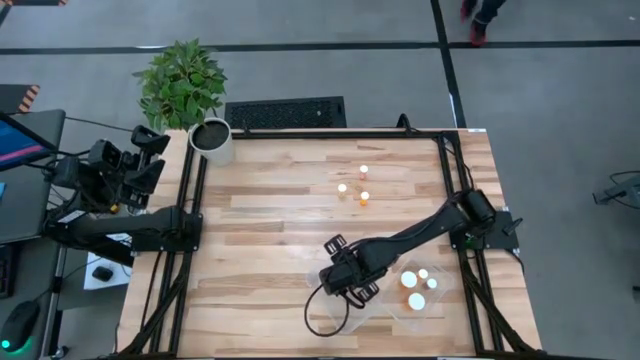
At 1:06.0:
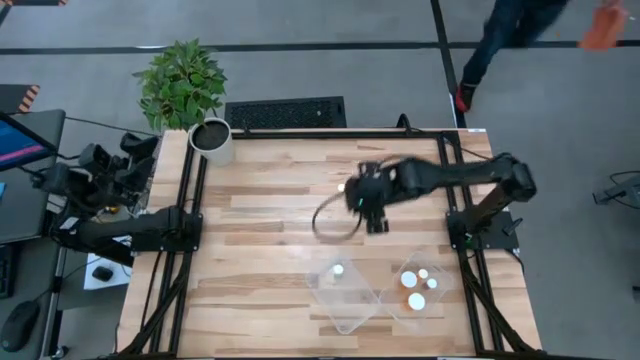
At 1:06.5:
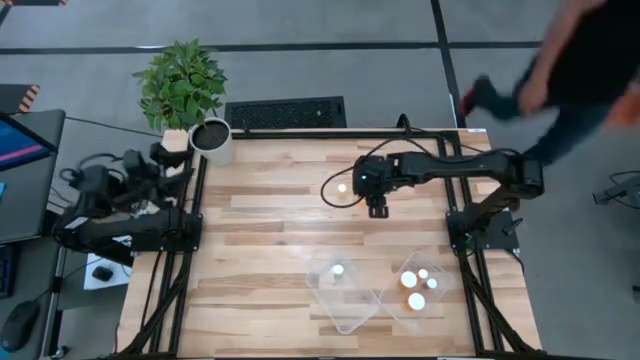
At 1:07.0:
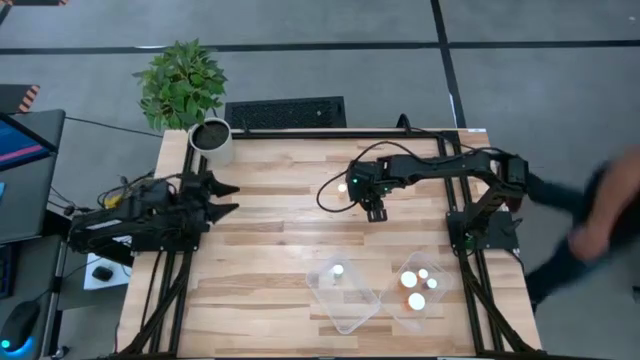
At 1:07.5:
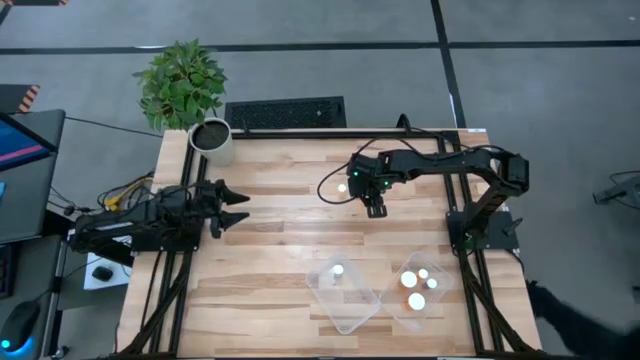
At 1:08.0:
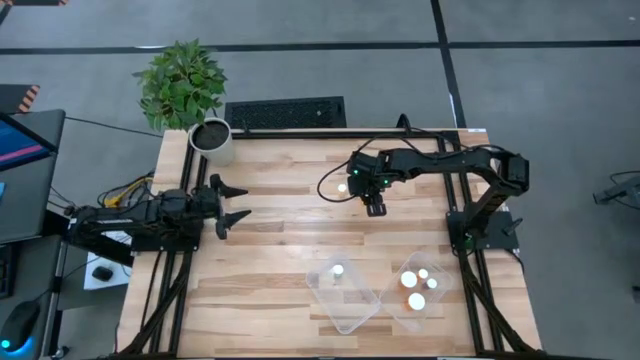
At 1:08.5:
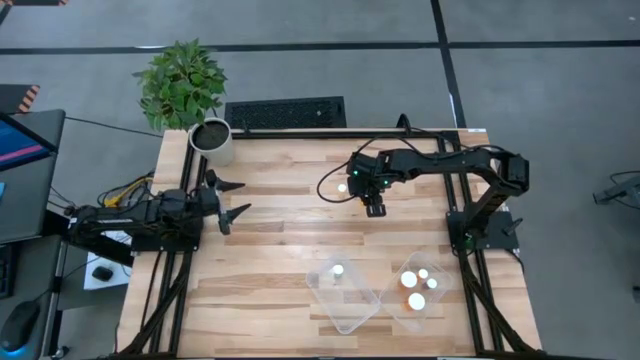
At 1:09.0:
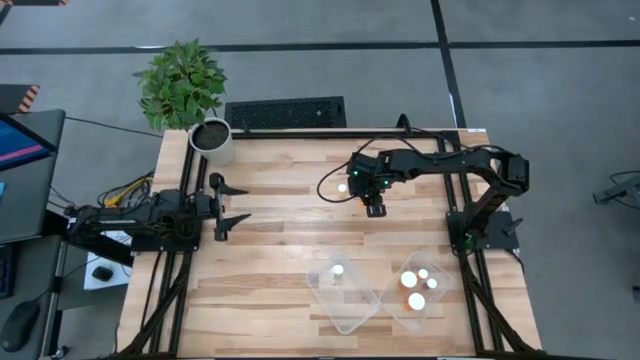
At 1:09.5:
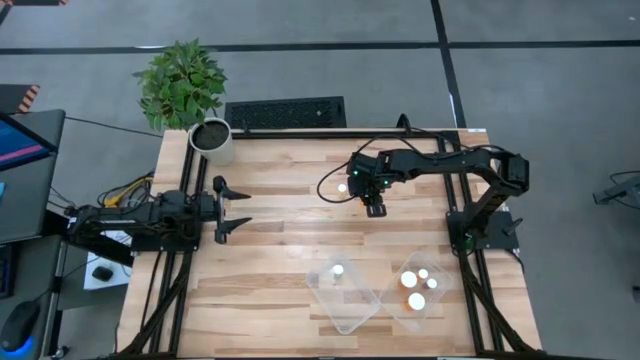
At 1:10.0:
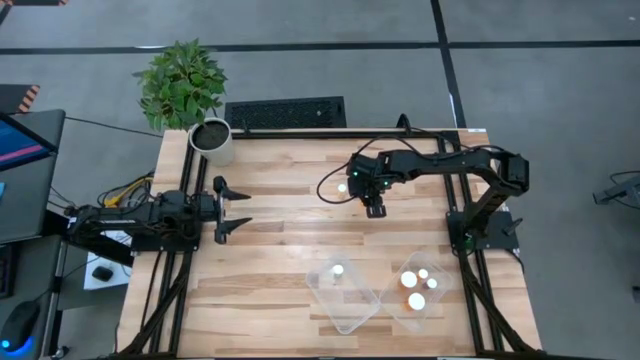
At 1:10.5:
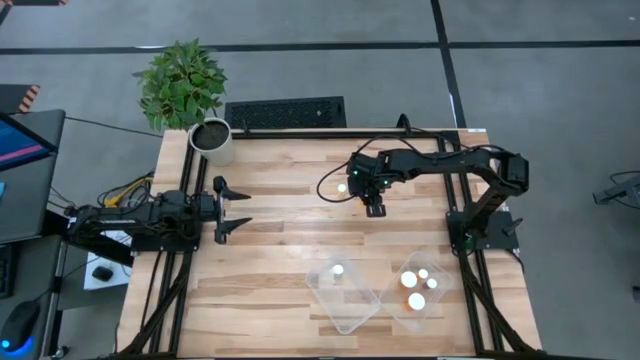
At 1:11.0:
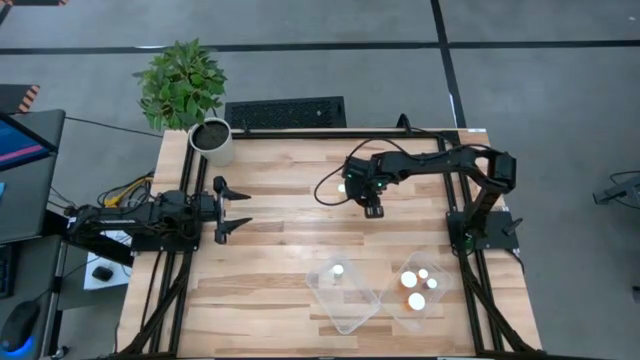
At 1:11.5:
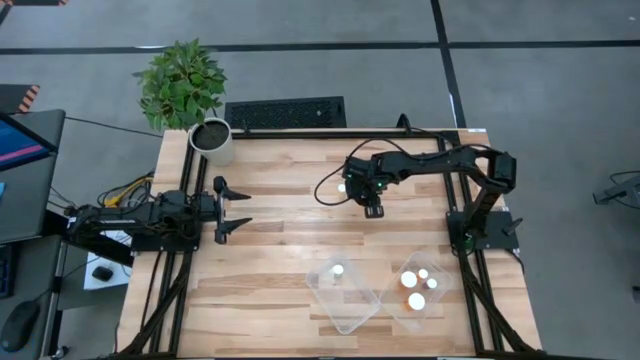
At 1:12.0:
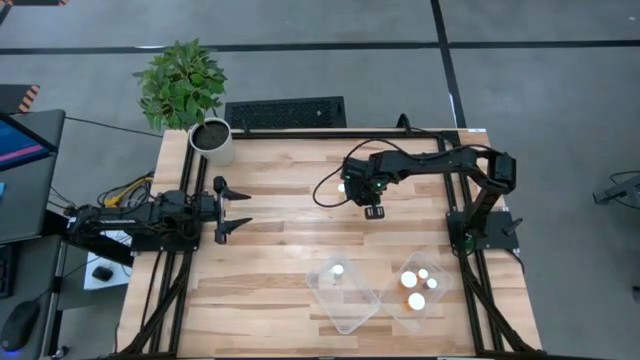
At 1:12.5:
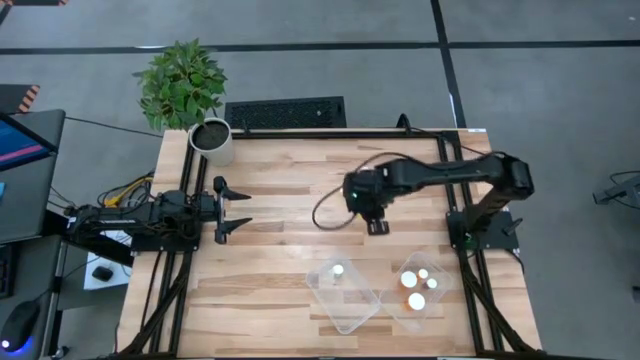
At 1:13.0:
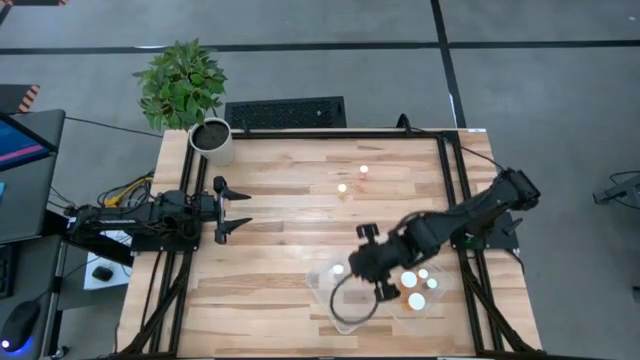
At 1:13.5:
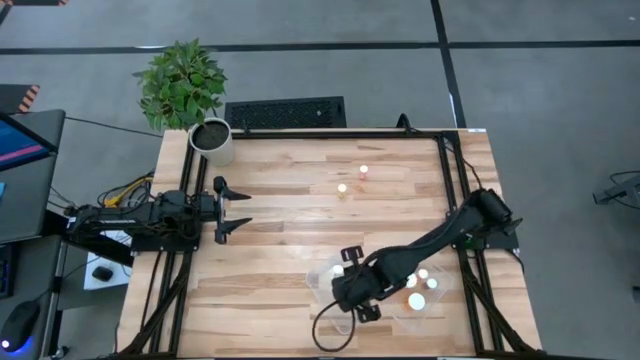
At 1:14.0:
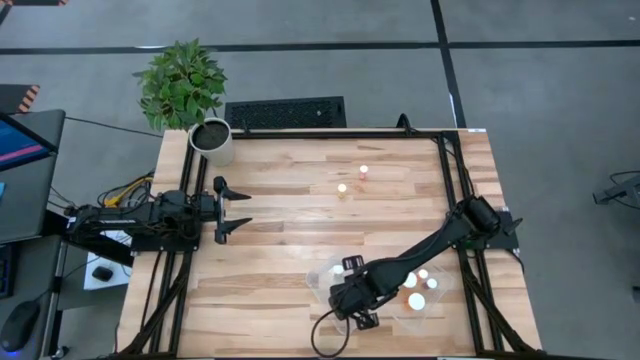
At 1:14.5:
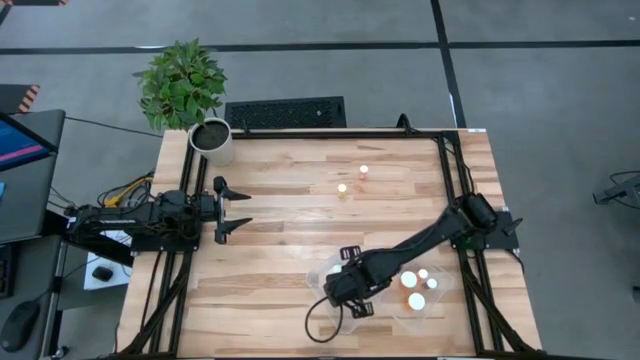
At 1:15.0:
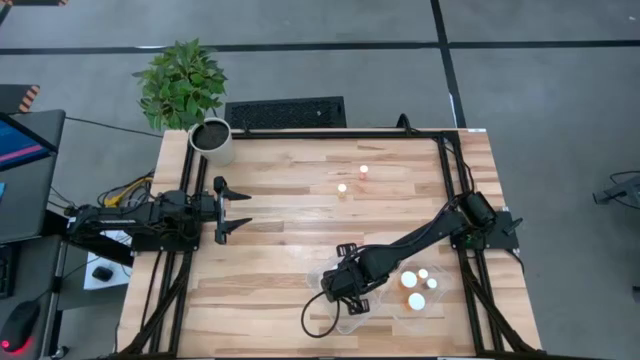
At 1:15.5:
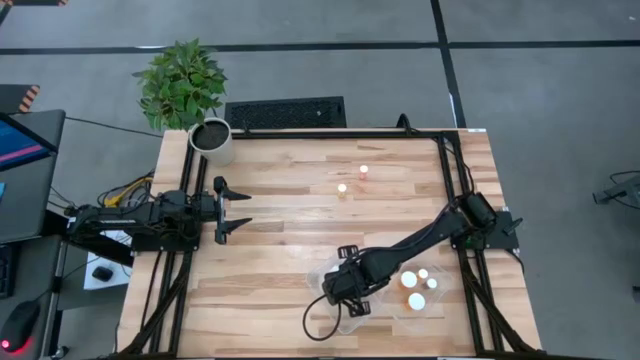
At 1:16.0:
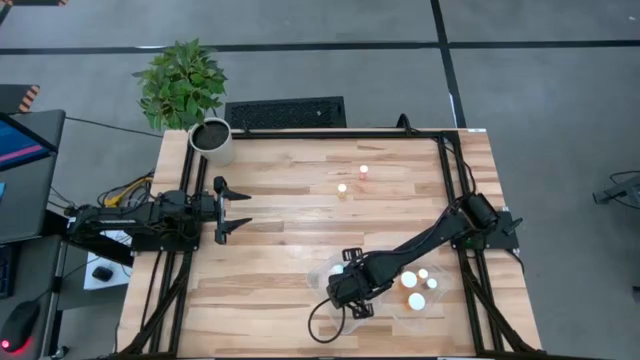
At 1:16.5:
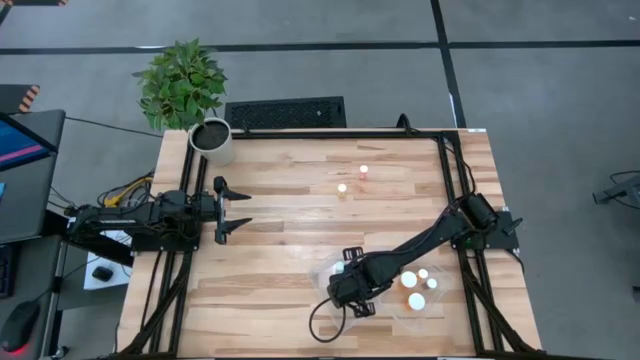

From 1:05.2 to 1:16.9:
Task: Pick and place medicine bottles into bin by pill shape (circle, oval)
Put the orange pill bottle into the left transparent bin

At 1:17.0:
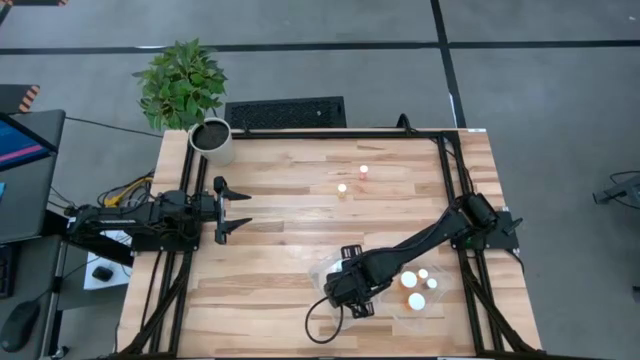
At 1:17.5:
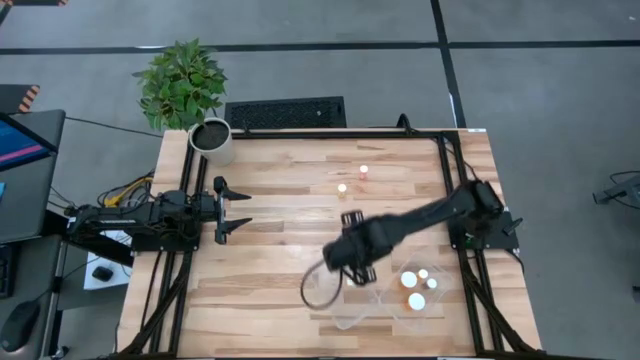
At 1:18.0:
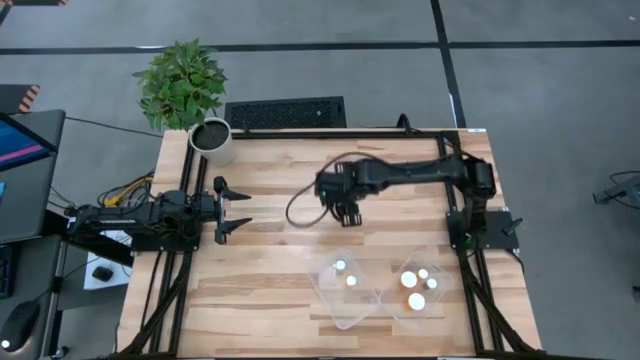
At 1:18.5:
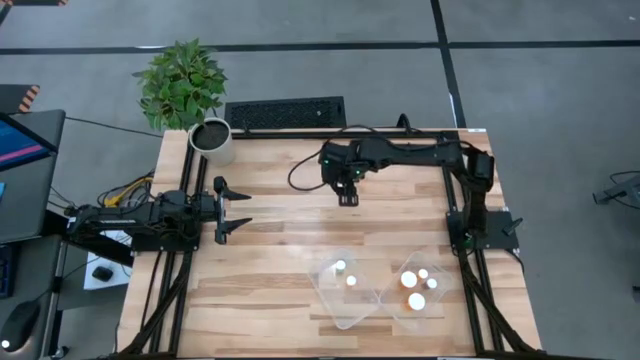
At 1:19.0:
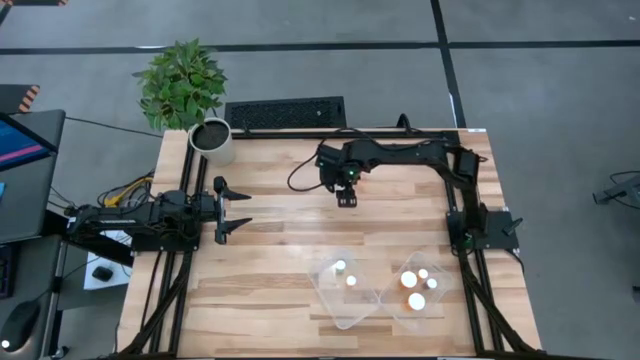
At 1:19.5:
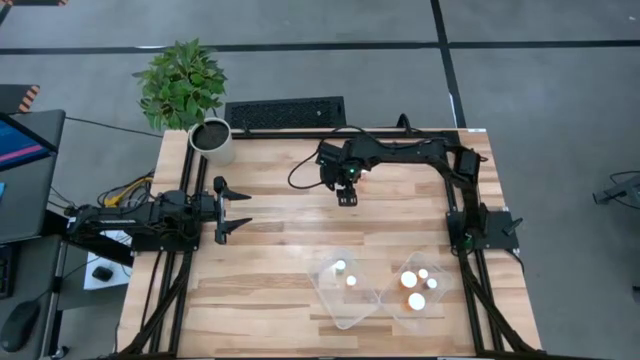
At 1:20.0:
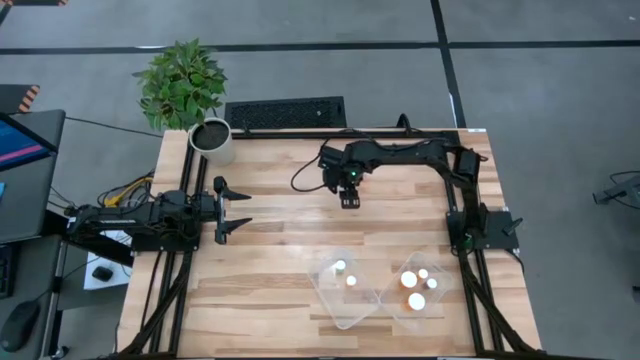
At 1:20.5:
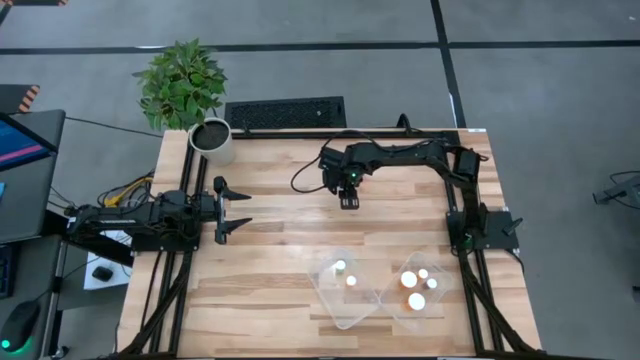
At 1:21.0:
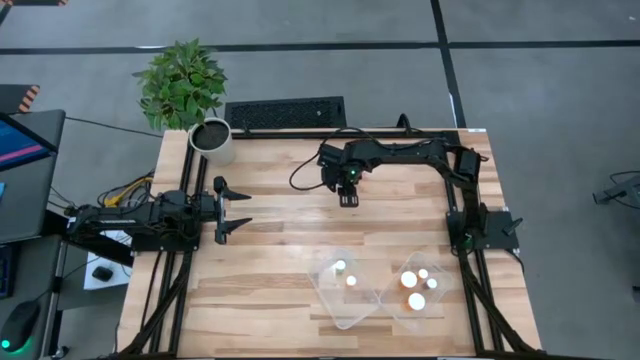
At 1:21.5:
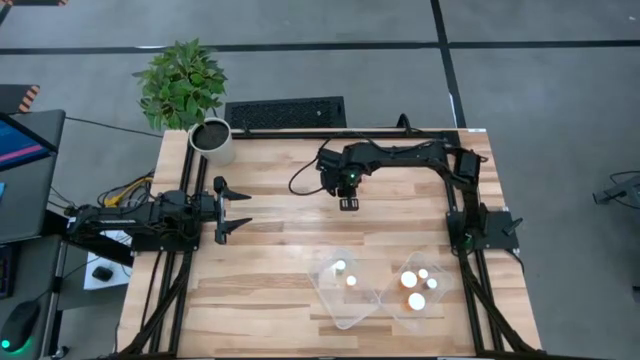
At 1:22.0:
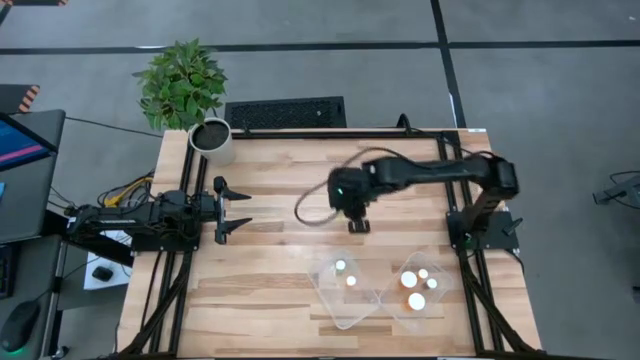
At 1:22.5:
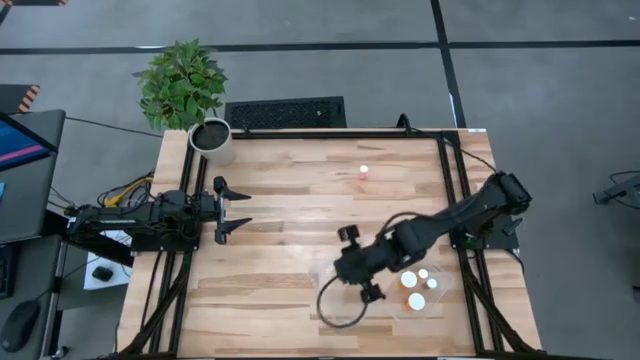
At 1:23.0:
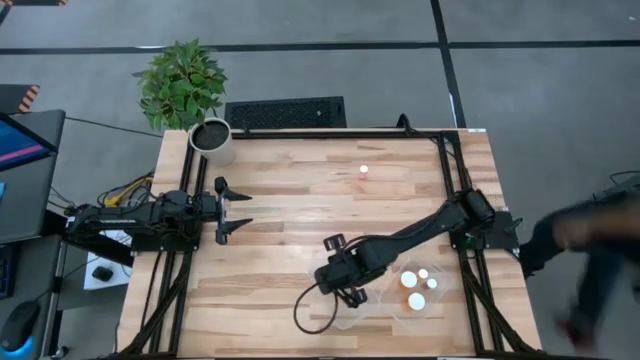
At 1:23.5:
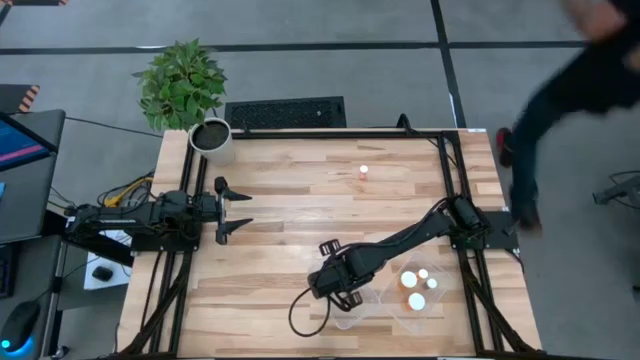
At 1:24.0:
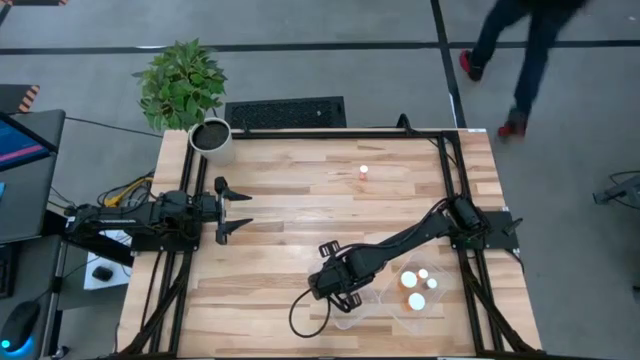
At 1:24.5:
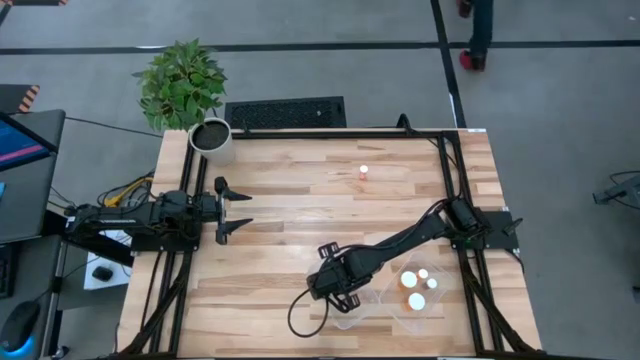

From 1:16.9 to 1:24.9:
Put the yellow pill bottle into the left transparent bin
